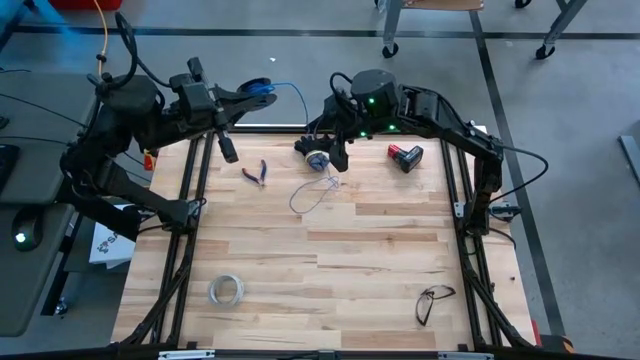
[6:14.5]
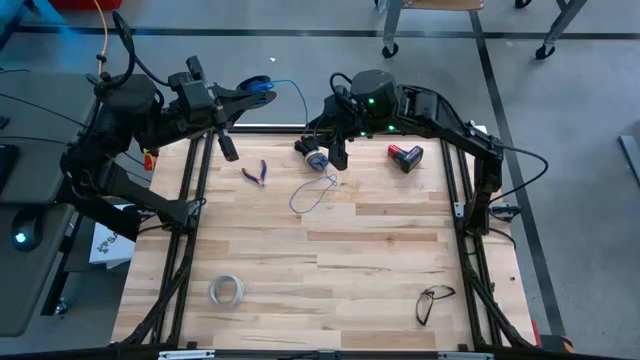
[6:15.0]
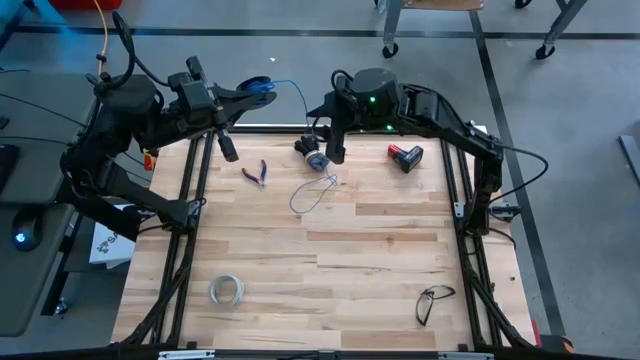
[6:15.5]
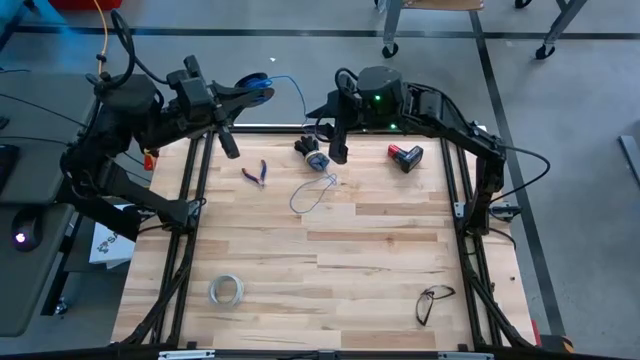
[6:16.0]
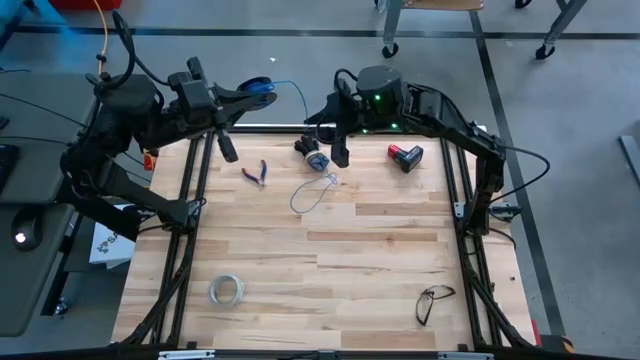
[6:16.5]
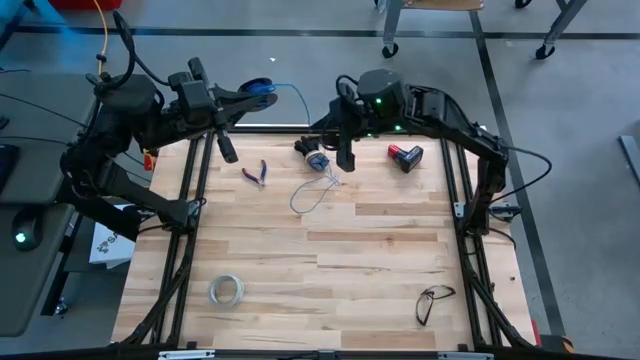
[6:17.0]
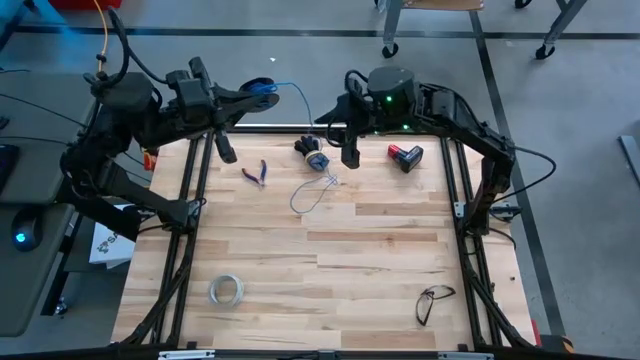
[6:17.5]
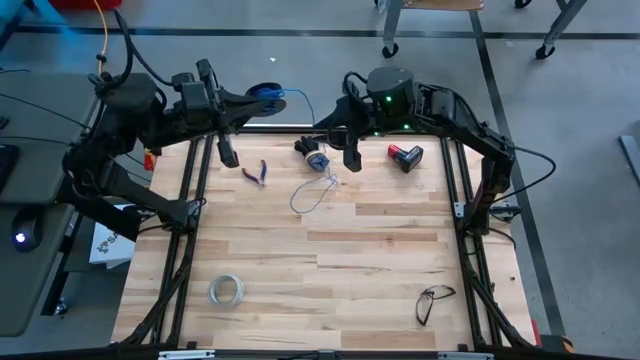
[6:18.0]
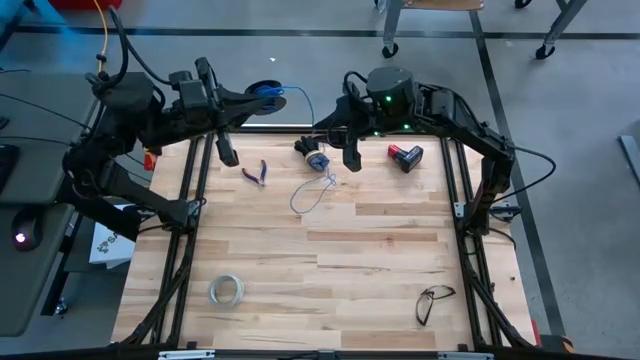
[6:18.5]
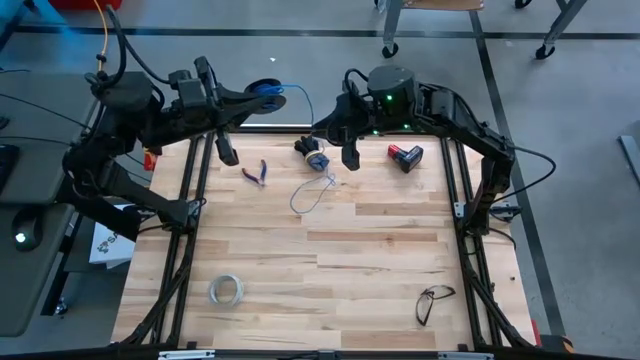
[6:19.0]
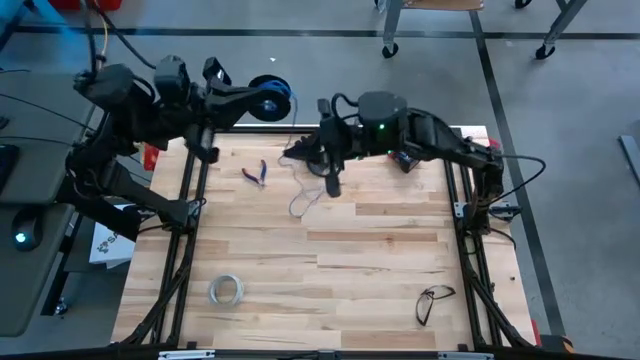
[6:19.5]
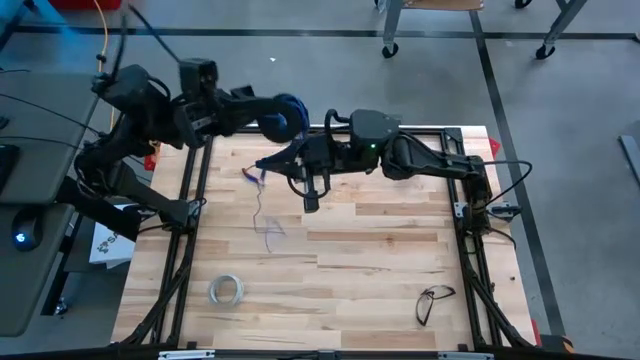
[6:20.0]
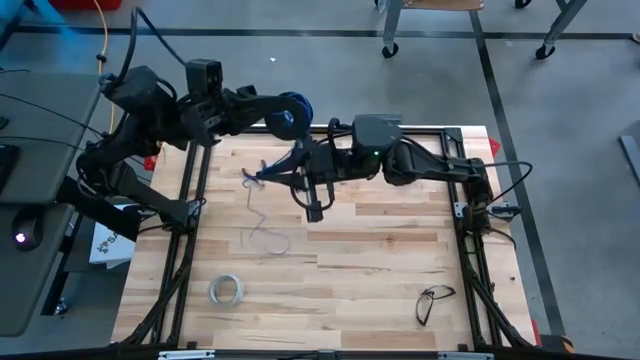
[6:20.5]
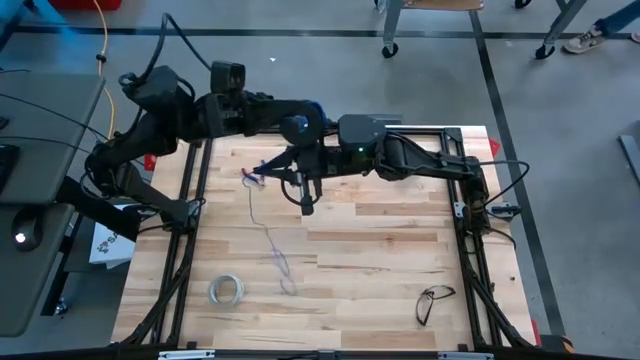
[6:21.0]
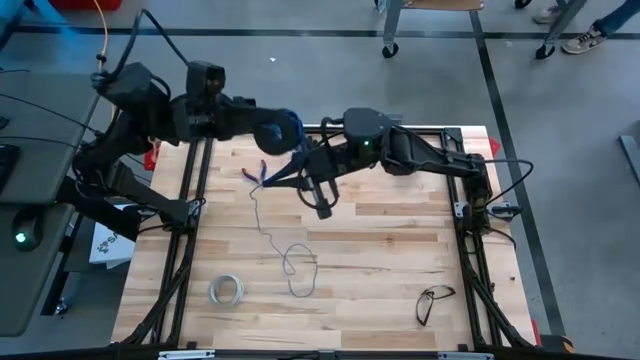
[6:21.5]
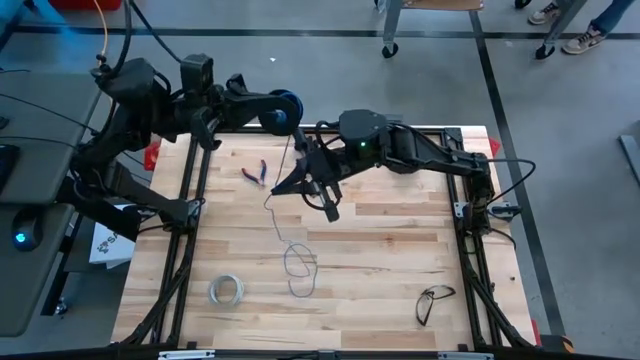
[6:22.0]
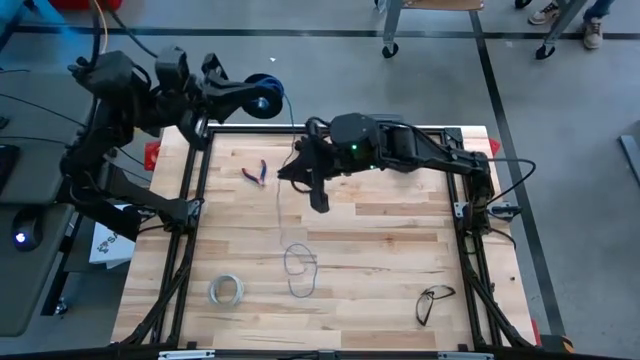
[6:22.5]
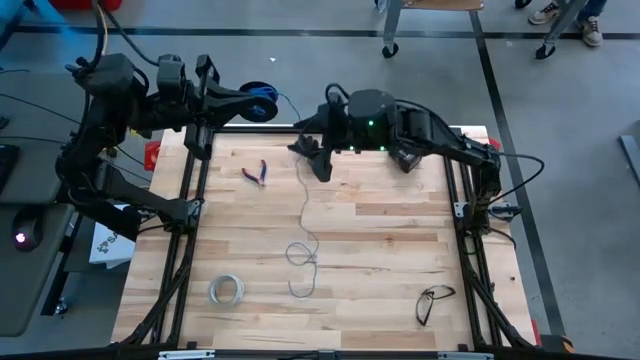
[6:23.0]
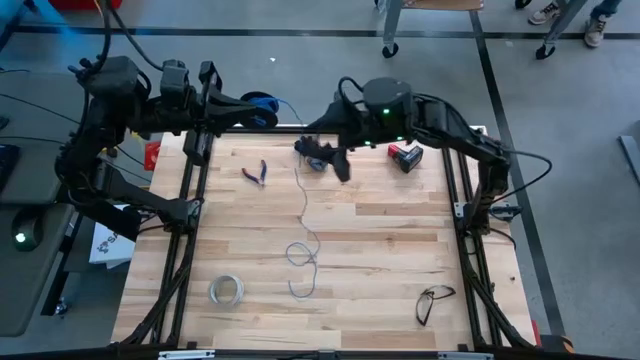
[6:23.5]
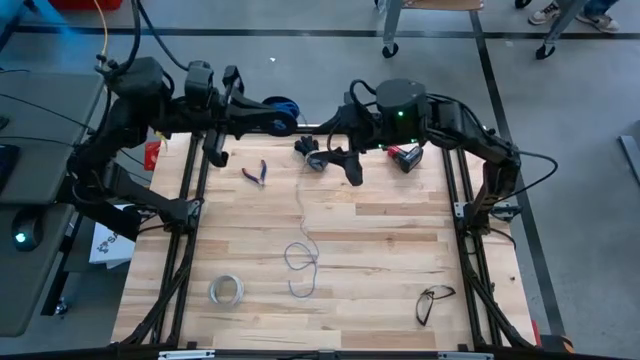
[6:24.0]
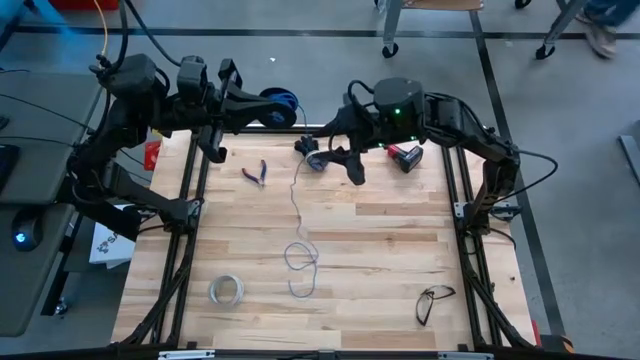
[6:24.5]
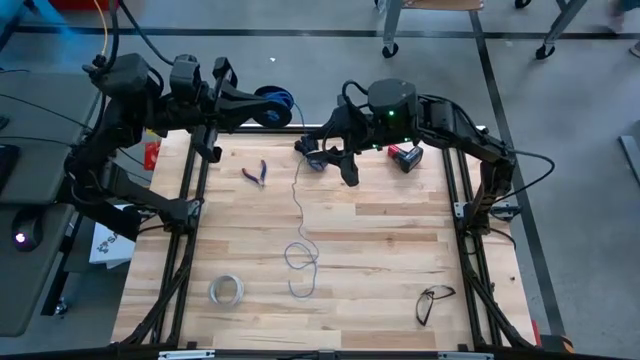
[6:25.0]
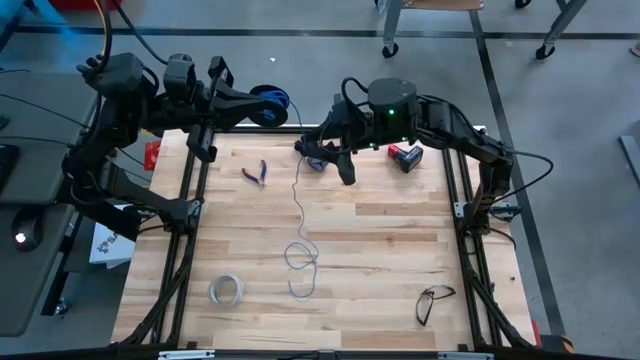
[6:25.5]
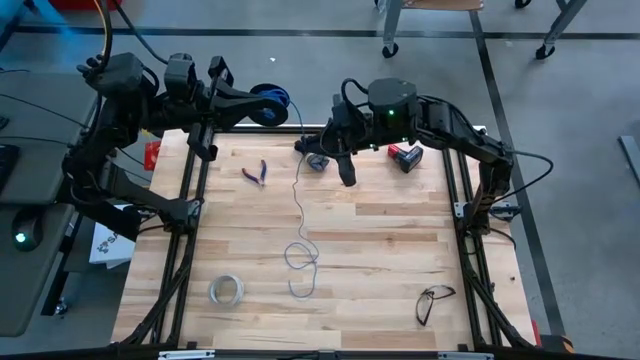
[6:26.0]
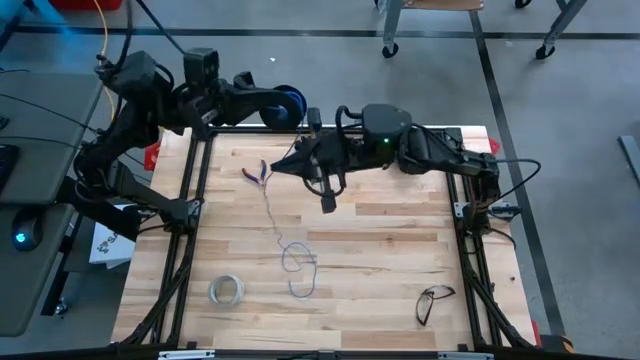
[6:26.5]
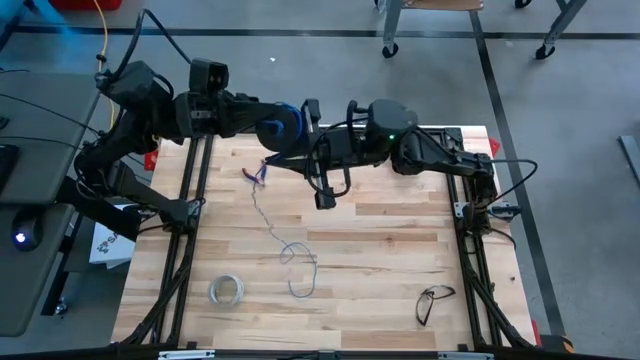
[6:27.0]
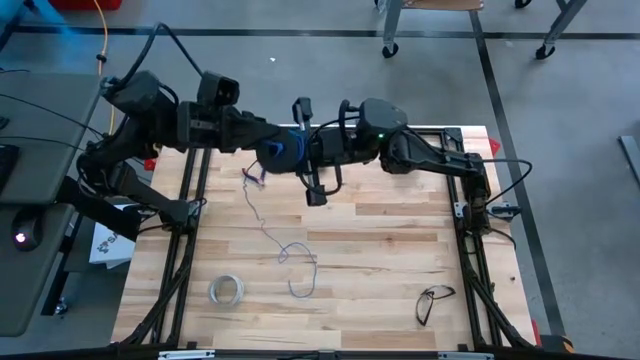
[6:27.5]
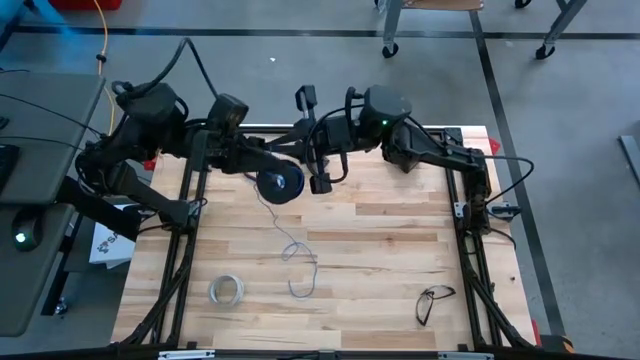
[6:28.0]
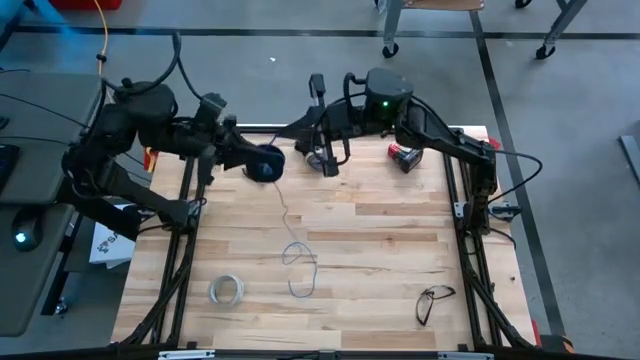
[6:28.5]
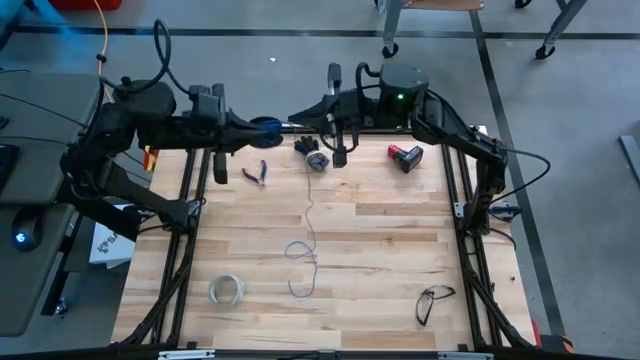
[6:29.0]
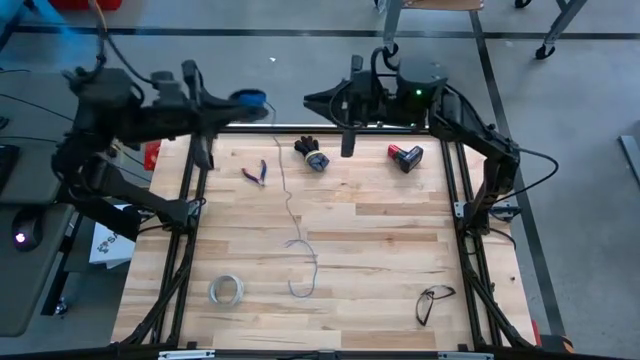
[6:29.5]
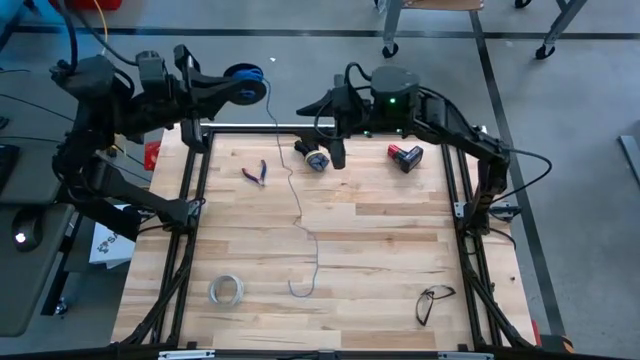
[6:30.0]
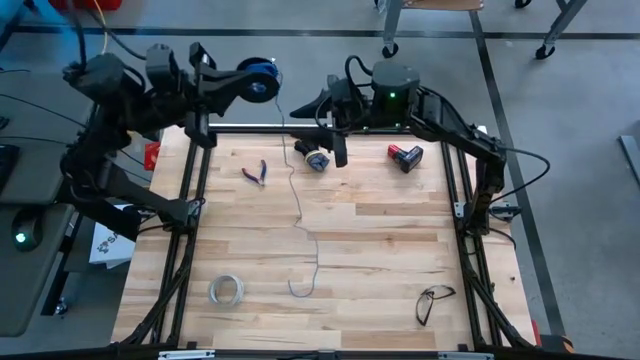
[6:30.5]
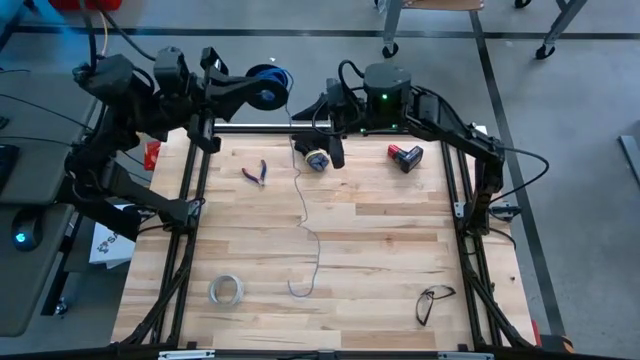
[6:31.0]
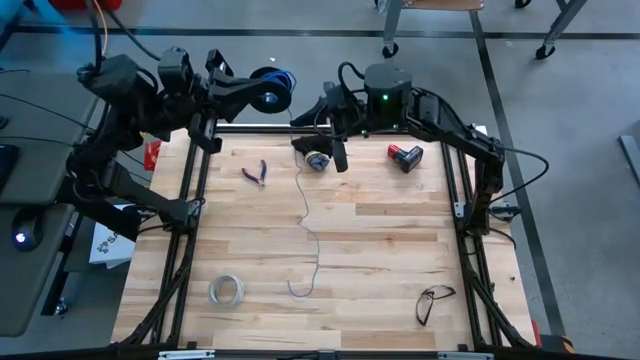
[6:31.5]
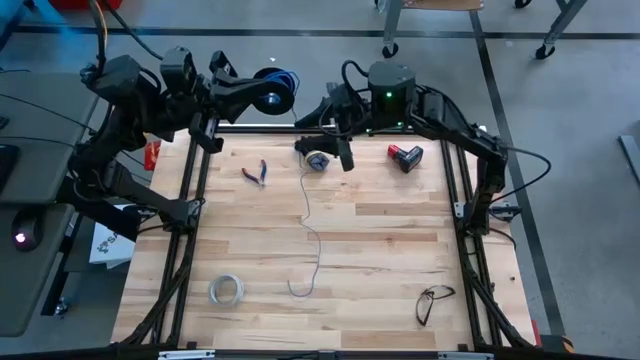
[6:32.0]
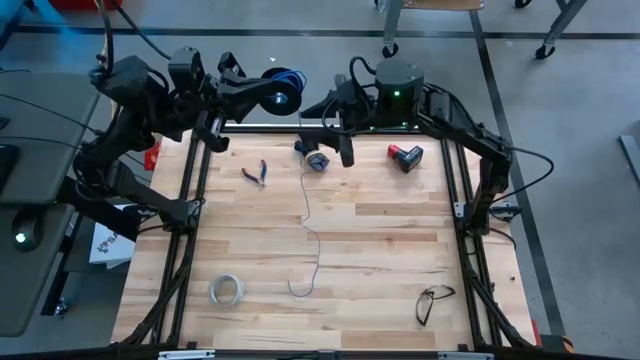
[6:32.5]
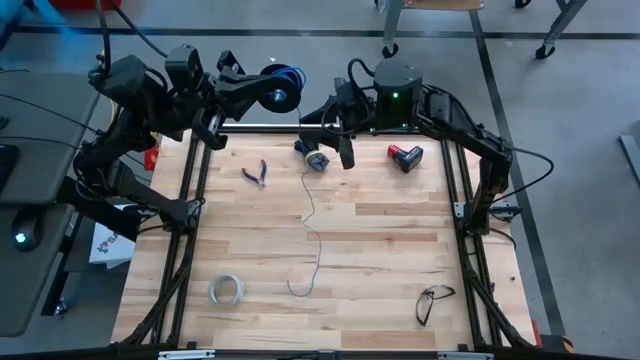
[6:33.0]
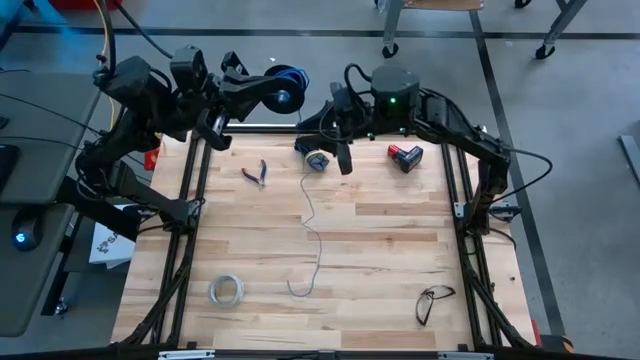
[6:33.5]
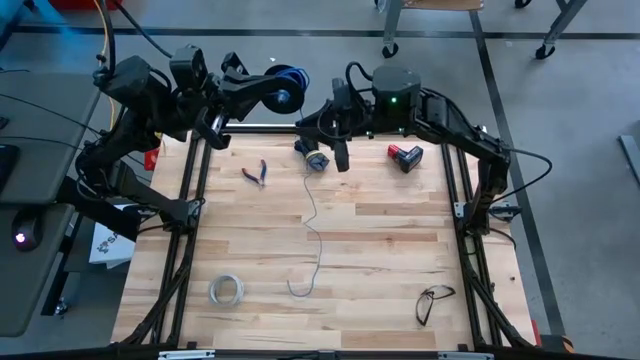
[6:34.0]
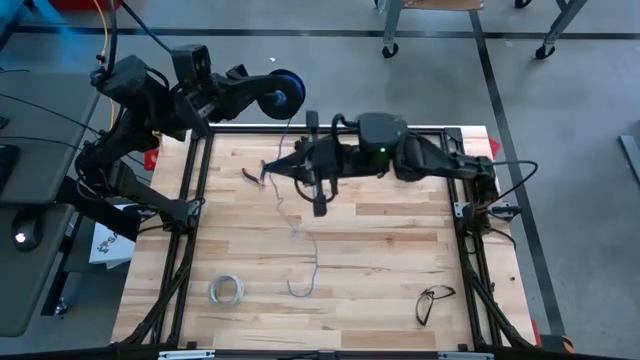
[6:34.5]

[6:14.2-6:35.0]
Task: Coil cords
Coil the blue wire onto the black spool
